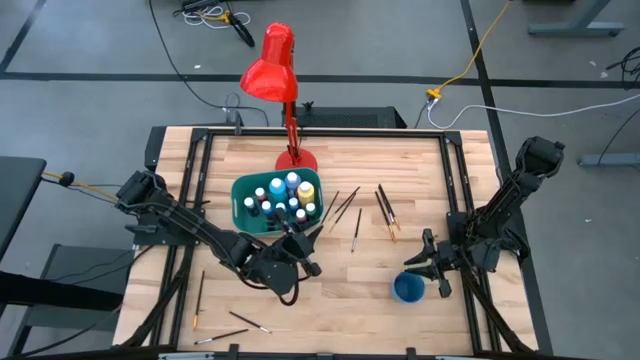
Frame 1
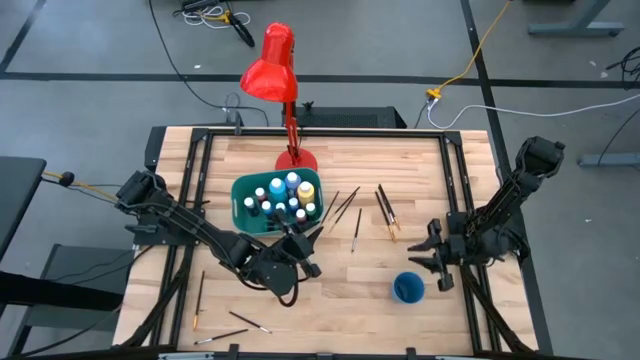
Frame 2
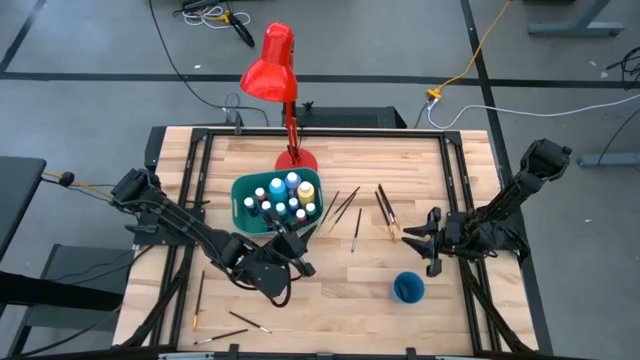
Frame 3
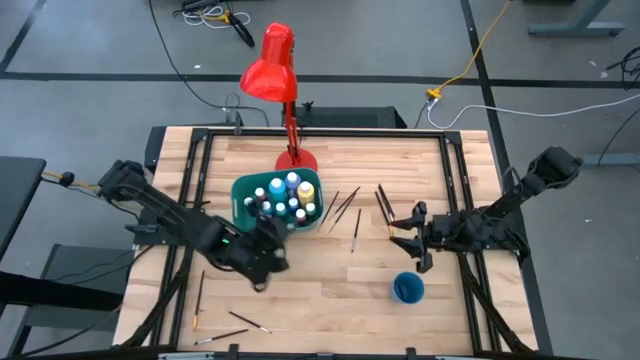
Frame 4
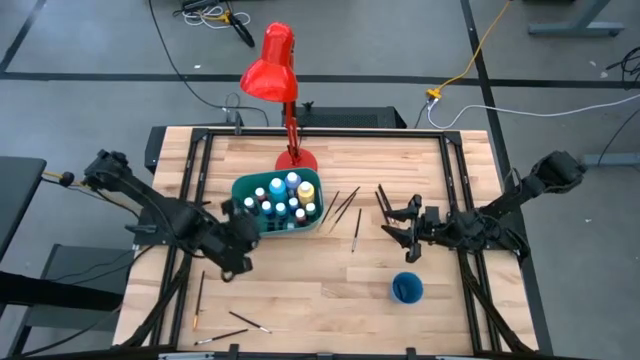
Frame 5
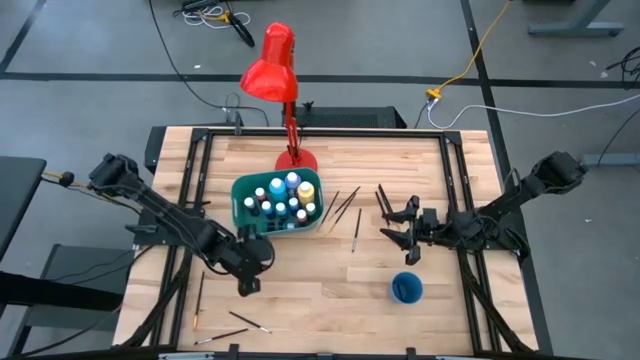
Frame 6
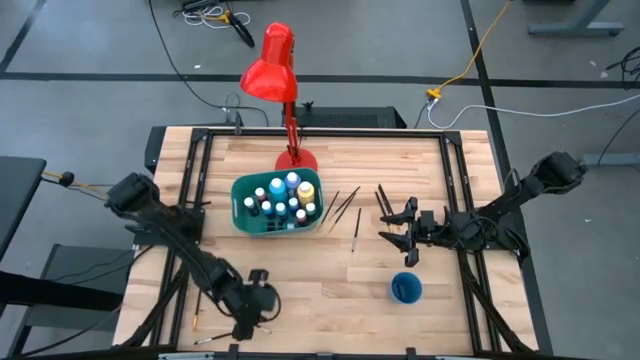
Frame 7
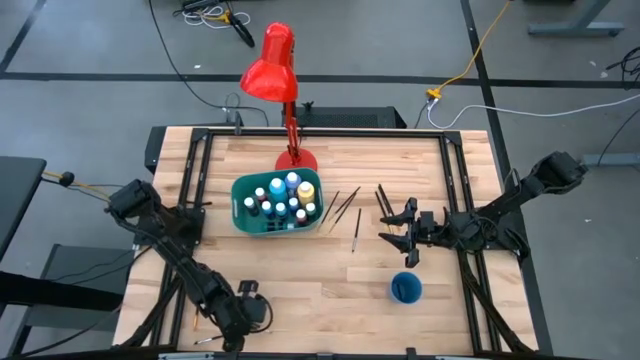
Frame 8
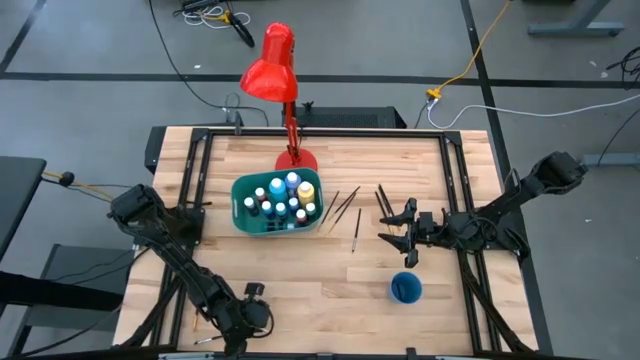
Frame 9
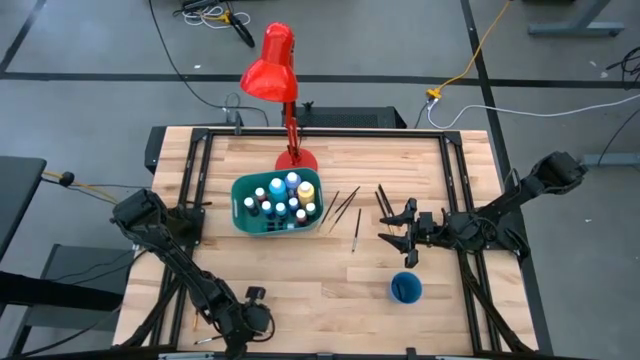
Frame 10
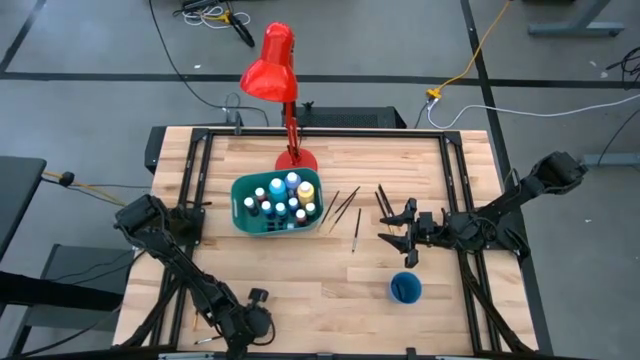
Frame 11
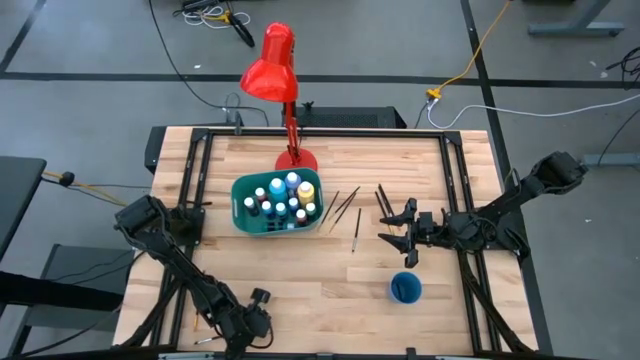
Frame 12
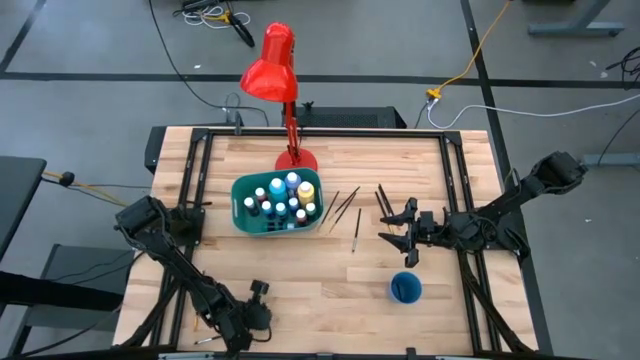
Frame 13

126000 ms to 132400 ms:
Task: Pick & Place Paint Supplies
Put the silver paint brush into the blue cup

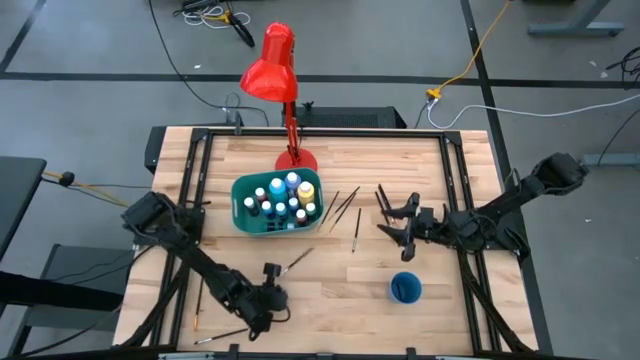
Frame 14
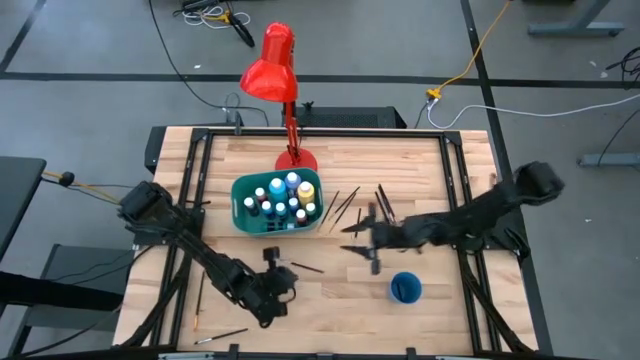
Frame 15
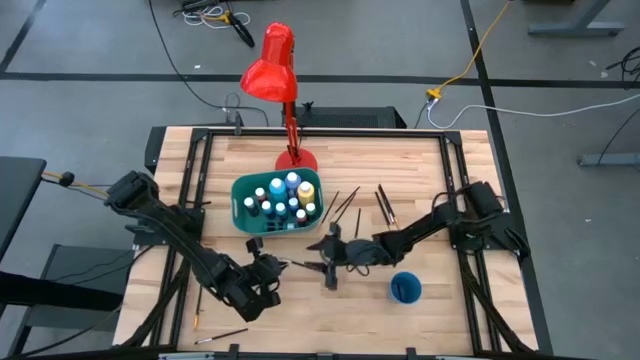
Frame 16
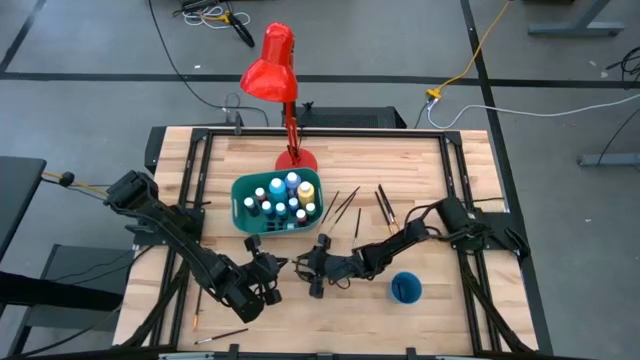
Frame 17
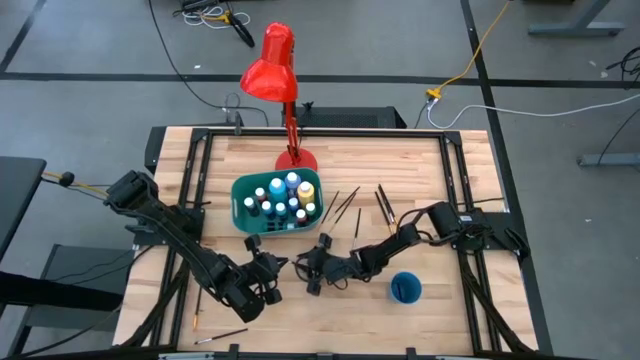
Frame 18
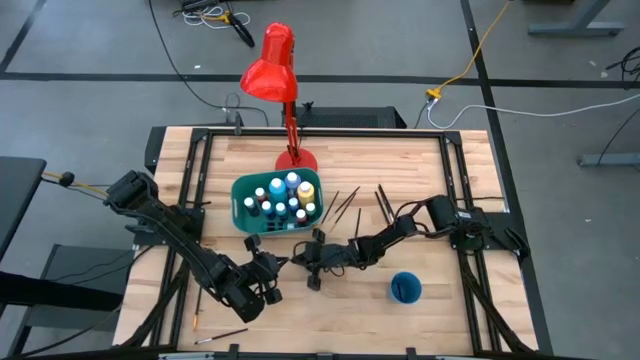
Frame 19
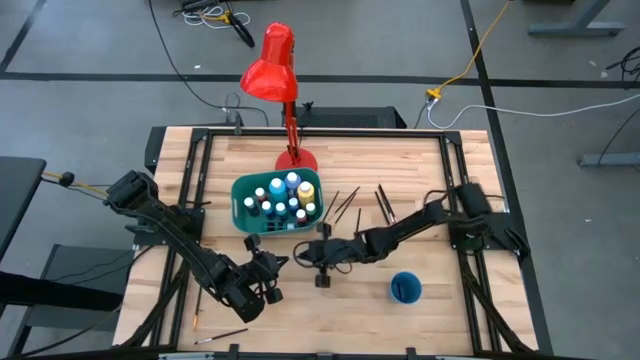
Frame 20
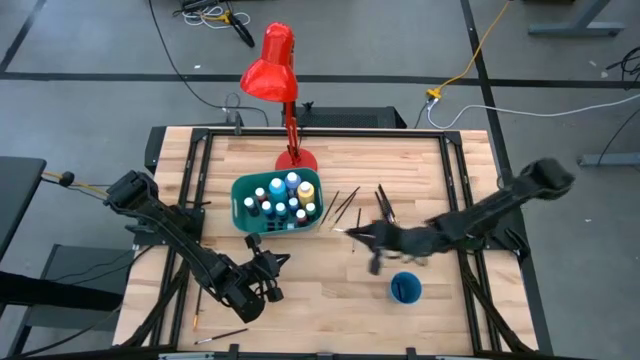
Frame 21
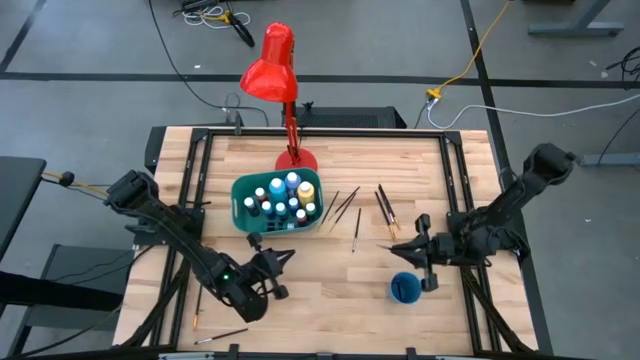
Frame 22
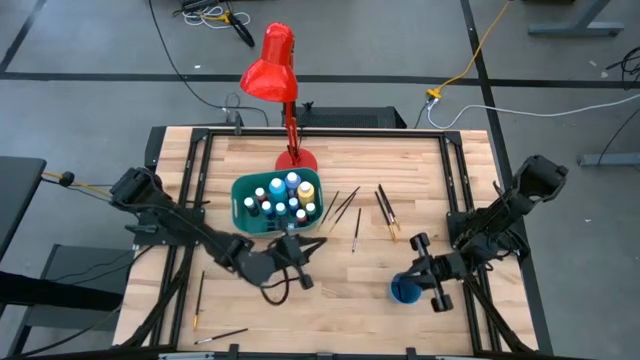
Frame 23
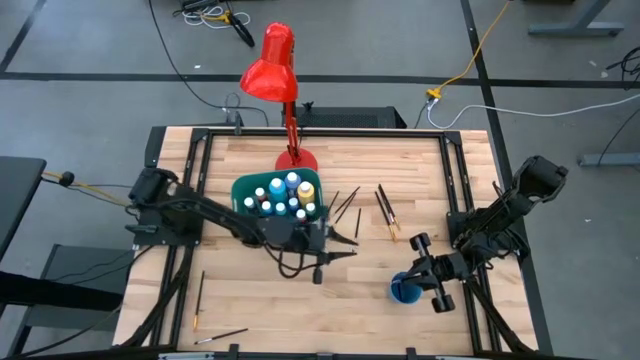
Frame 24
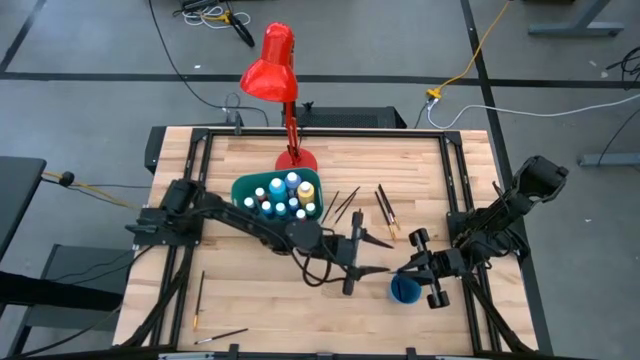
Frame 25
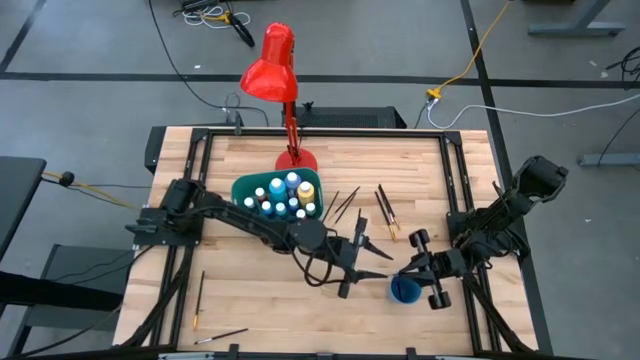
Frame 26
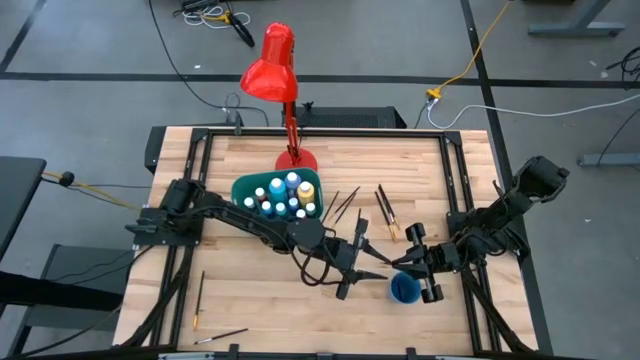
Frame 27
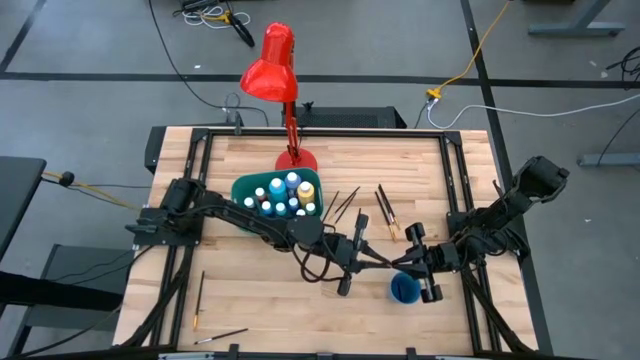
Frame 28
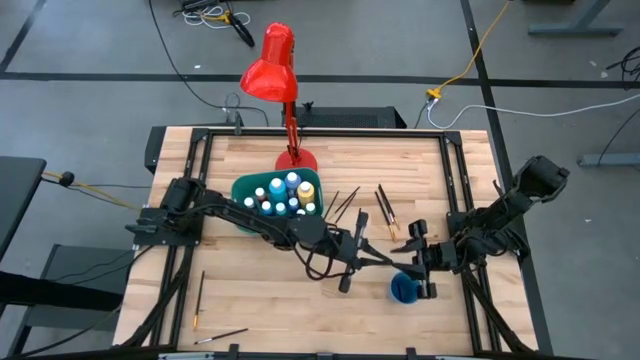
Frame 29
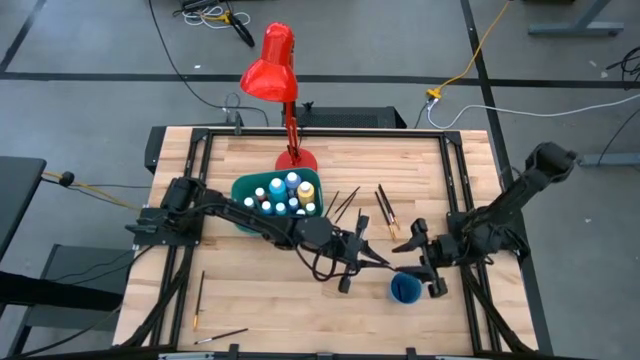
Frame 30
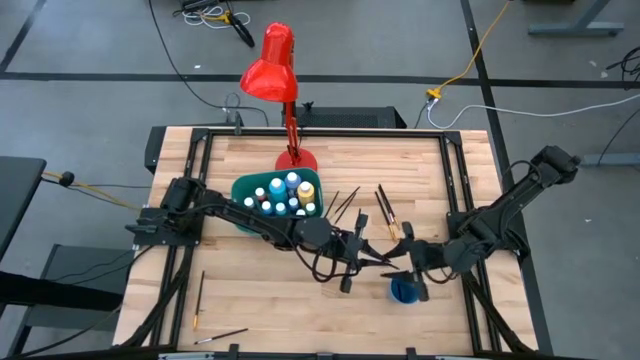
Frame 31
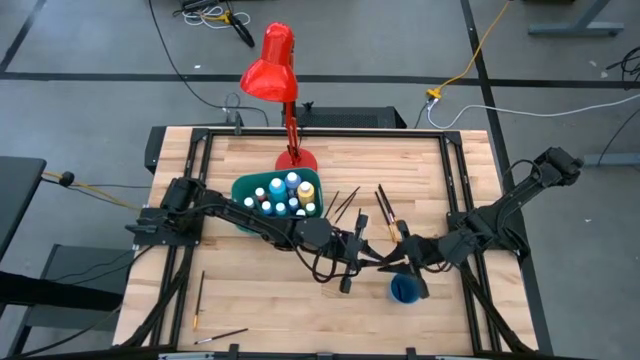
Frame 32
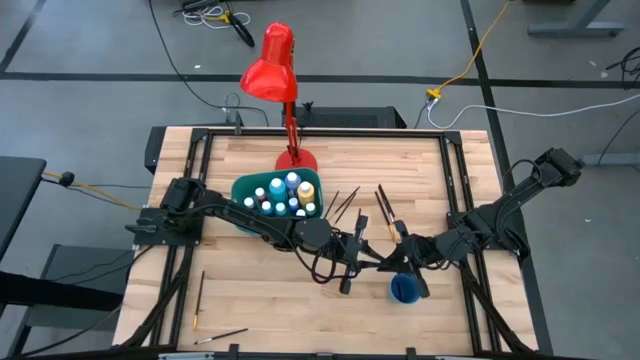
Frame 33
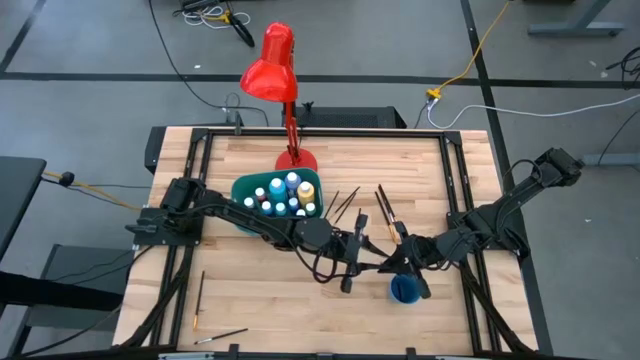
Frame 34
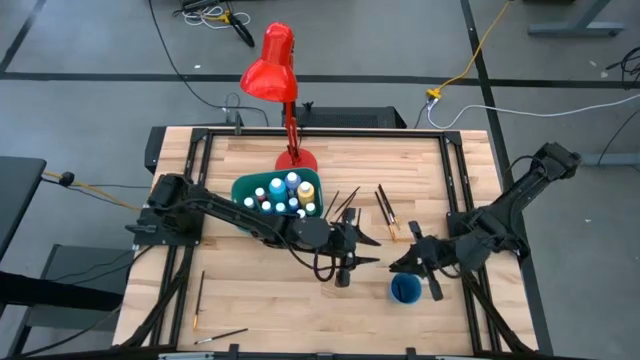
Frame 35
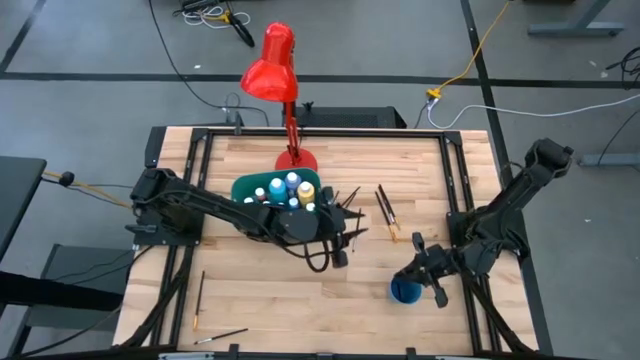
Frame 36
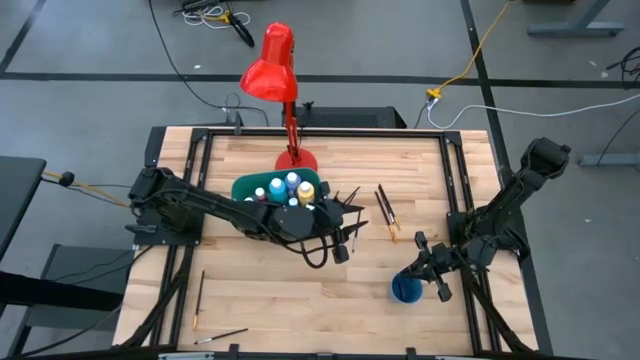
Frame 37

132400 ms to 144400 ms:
Put the silver paint brush into the blue cup

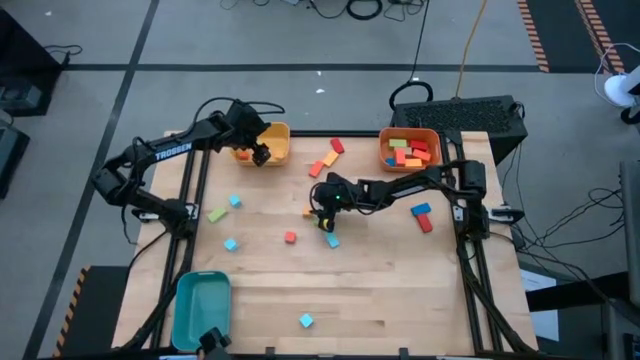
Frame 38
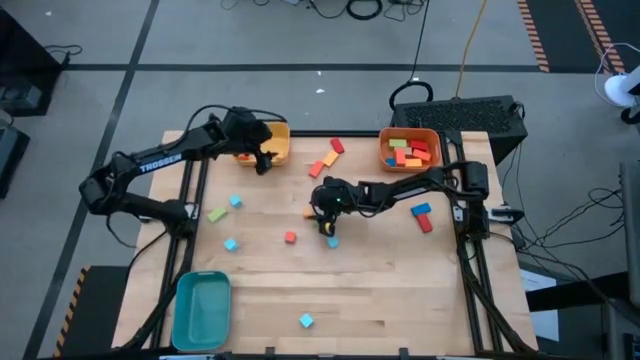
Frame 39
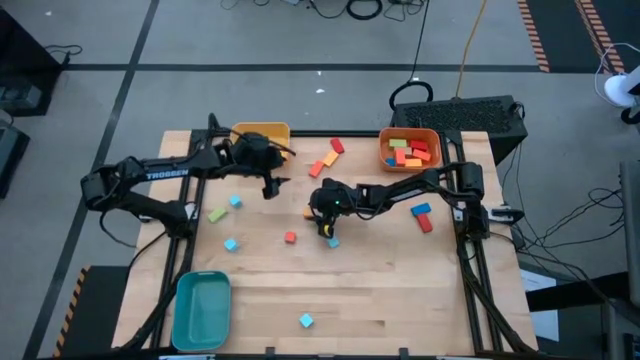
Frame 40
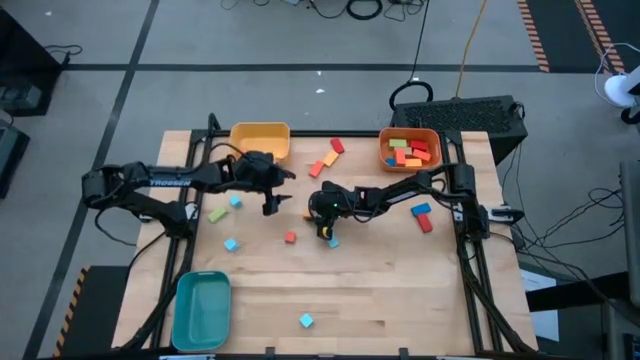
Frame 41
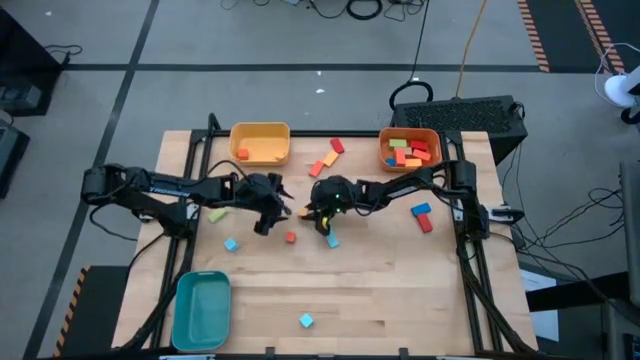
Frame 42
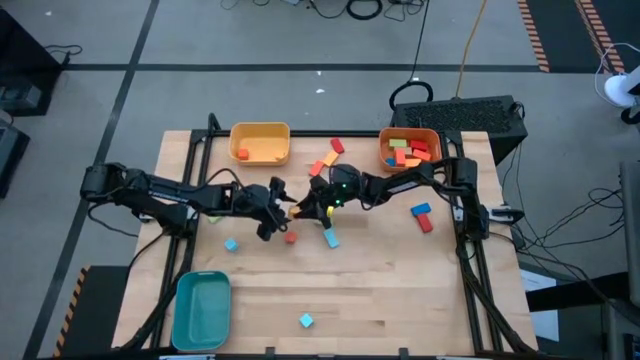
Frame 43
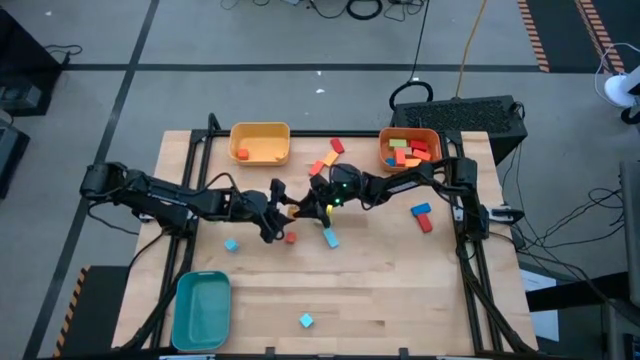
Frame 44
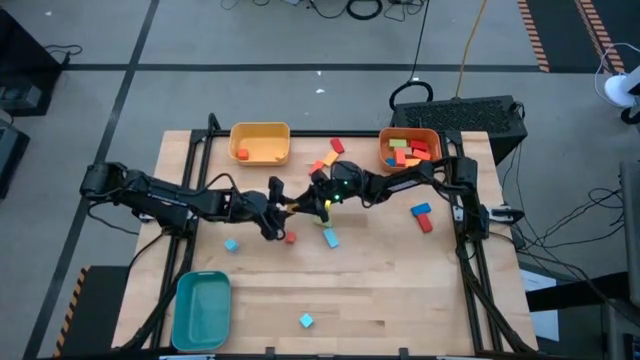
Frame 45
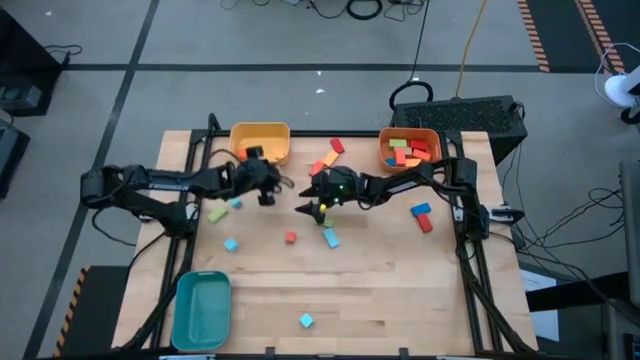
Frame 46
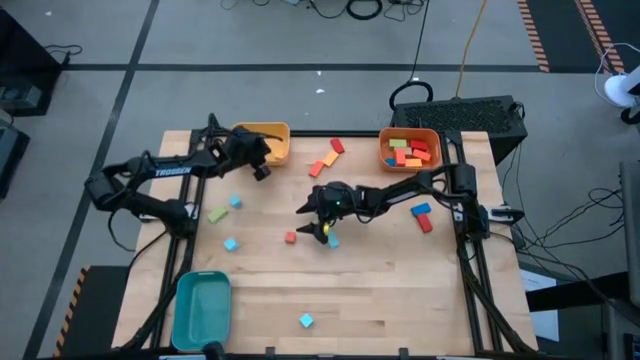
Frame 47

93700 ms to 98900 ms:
Task: Sort blocks by size
Put the small yellow block into the yellow bin
